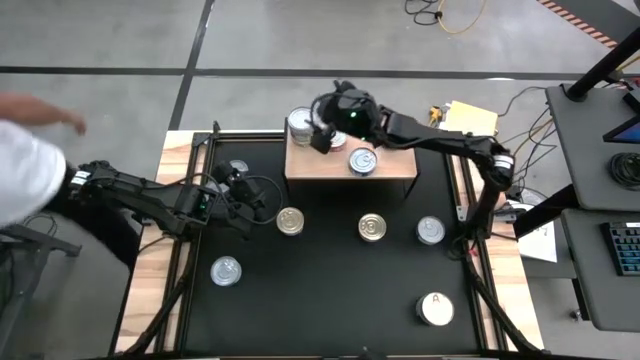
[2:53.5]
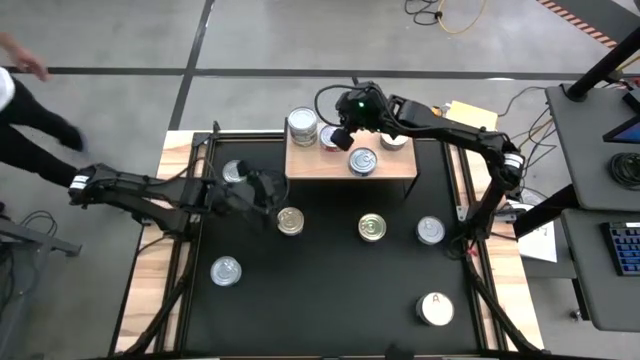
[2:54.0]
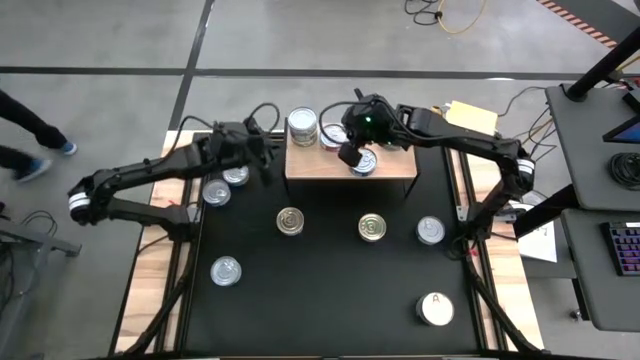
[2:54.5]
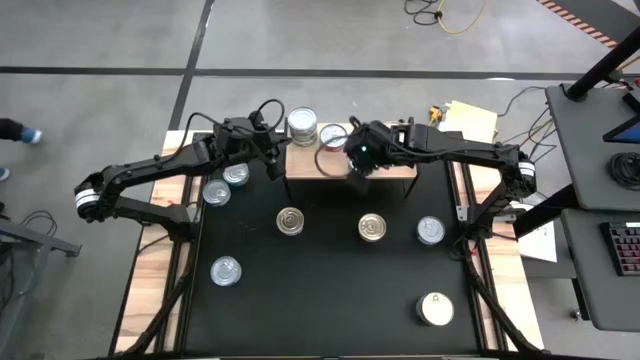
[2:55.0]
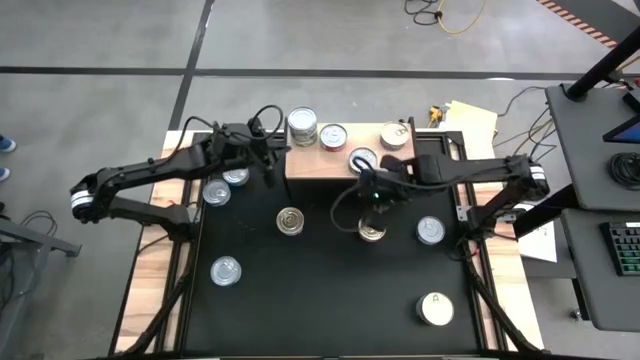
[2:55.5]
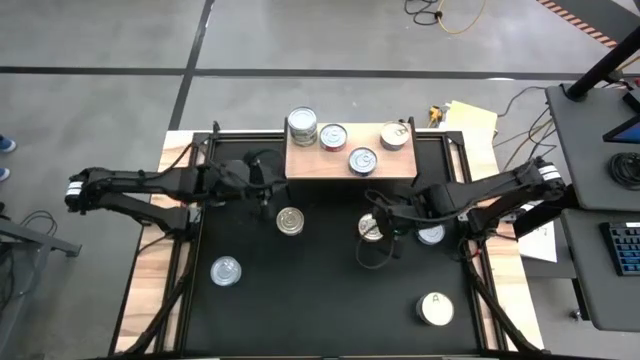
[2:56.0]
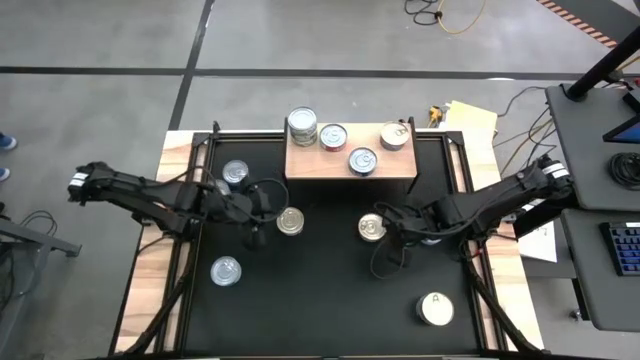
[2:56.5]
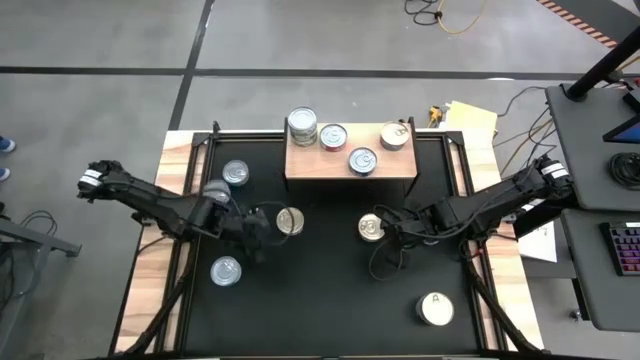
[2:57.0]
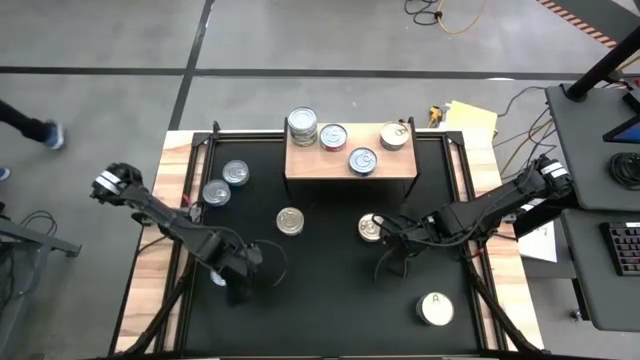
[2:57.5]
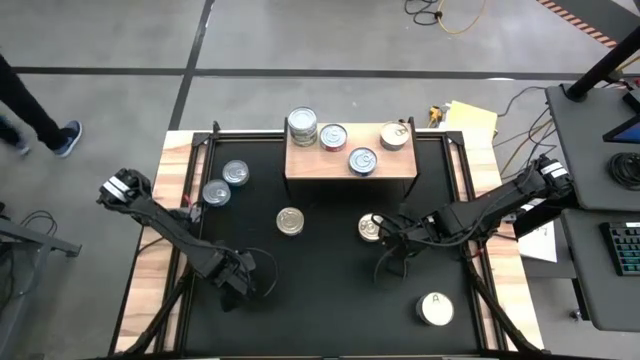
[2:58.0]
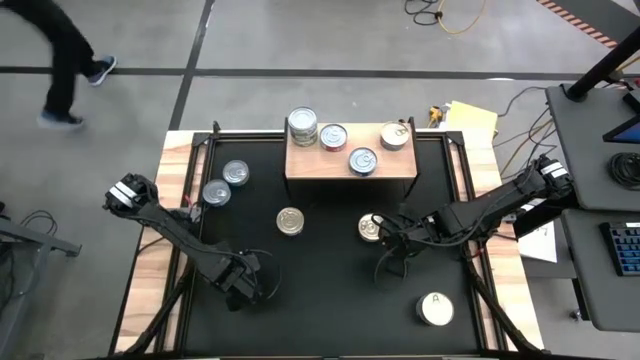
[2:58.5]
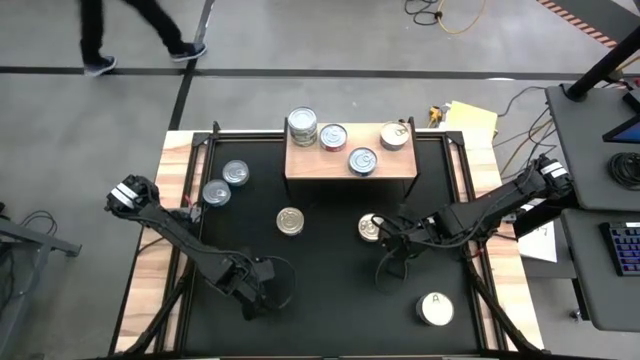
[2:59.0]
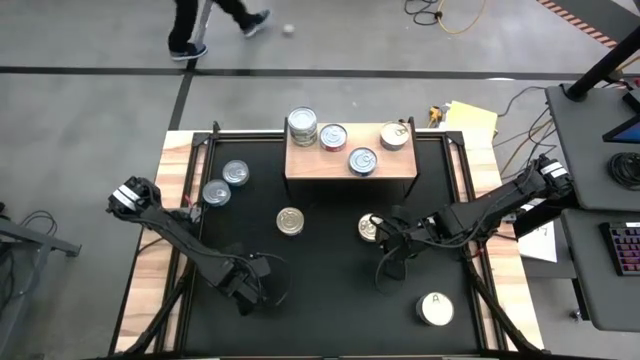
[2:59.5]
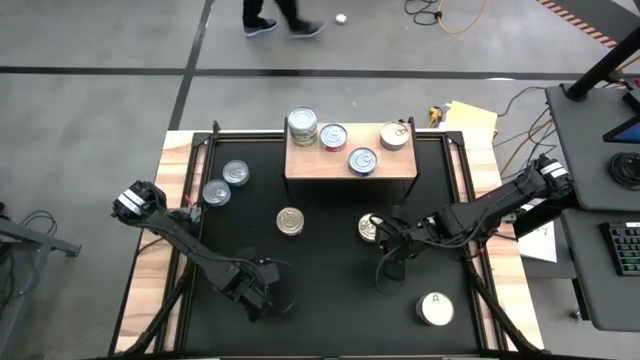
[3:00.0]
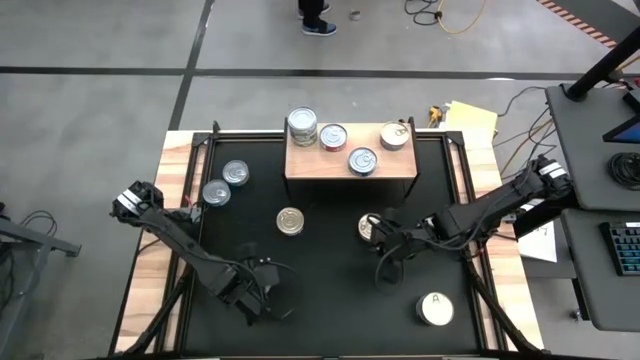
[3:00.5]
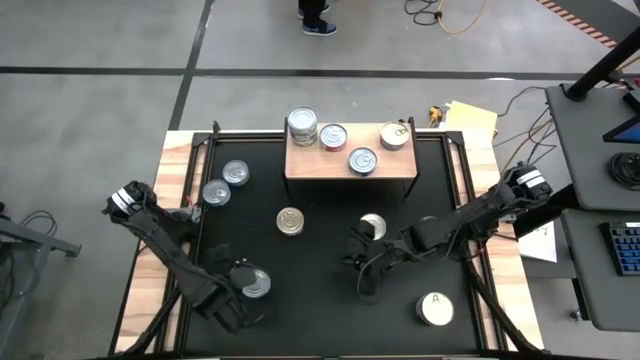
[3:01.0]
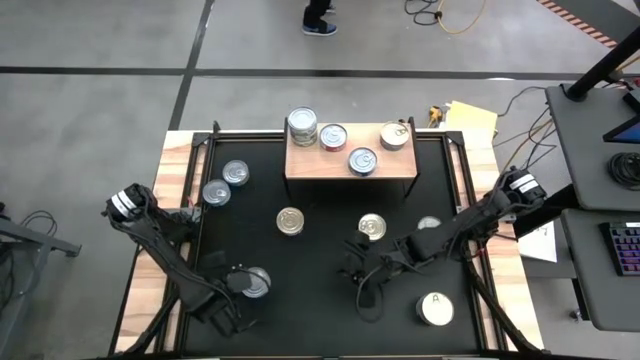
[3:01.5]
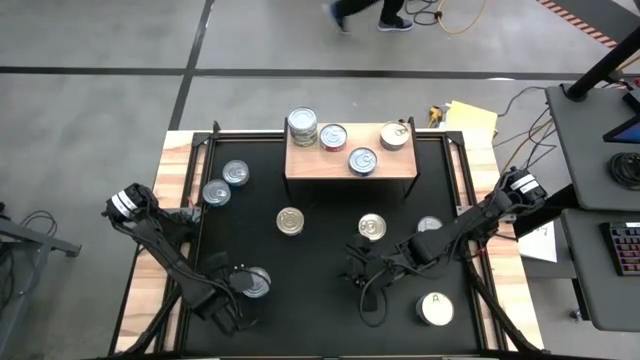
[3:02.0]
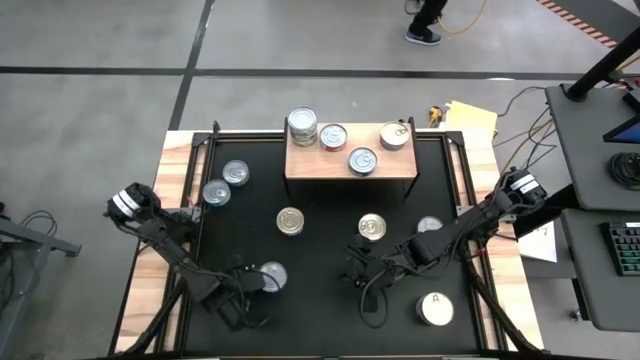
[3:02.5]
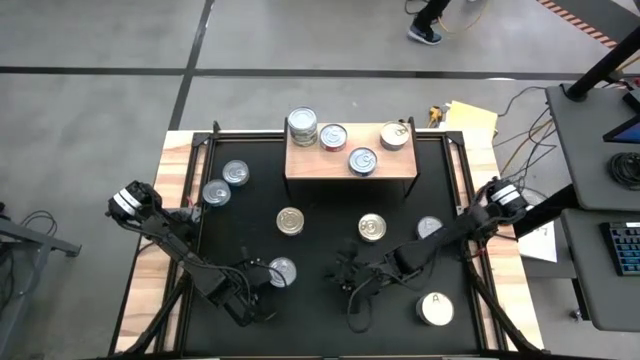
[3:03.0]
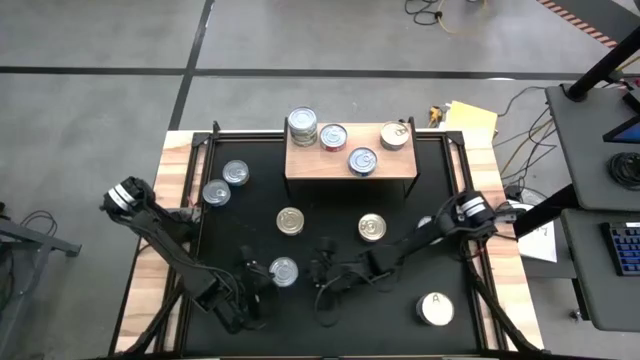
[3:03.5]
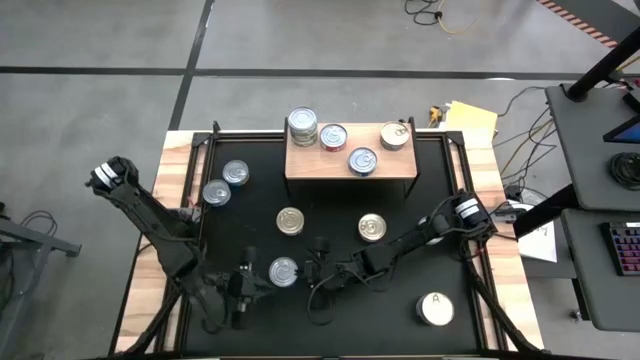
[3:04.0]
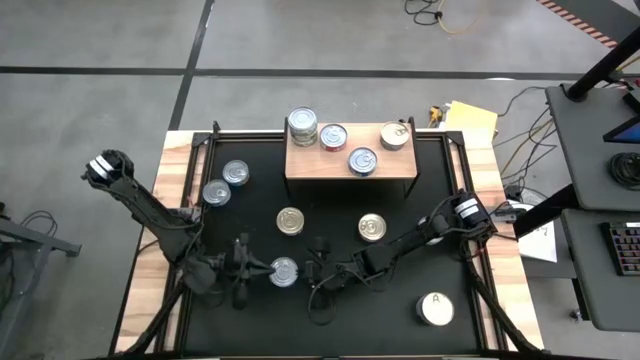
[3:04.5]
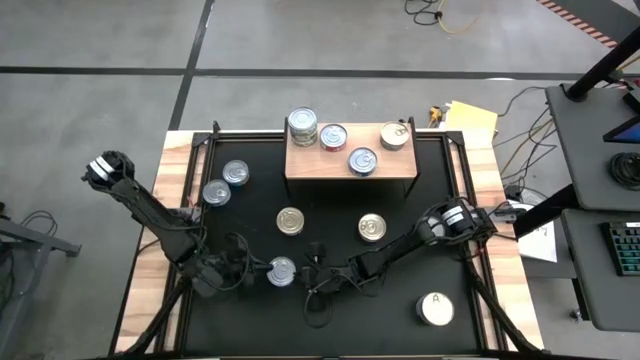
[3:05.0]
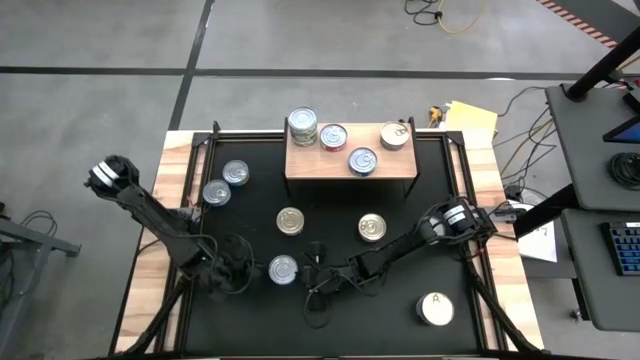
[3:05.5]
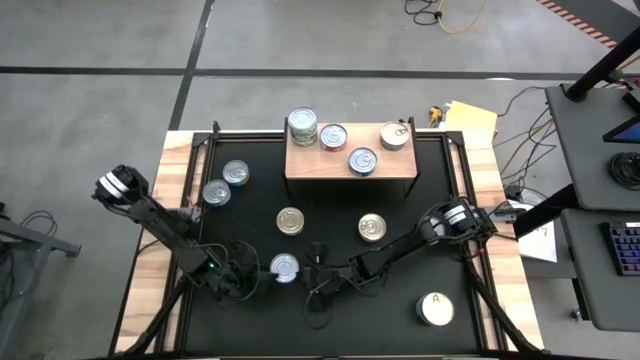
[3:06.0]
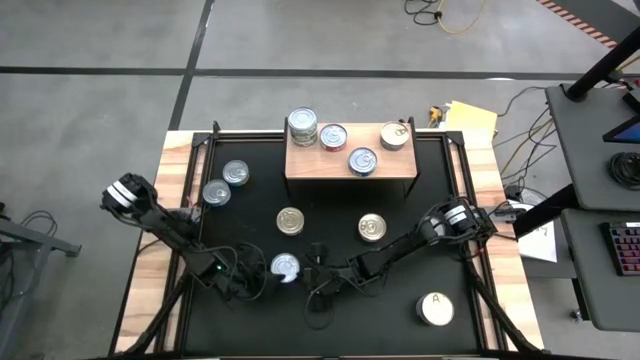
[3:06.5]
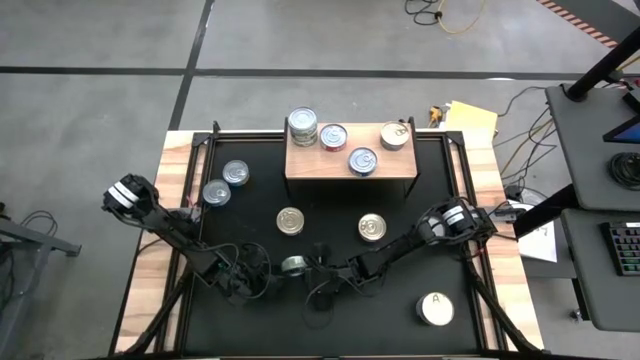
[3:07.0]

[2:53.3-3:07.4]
Task: Stack canned seafood by type on shelf
Put the green tuna can on the shelf

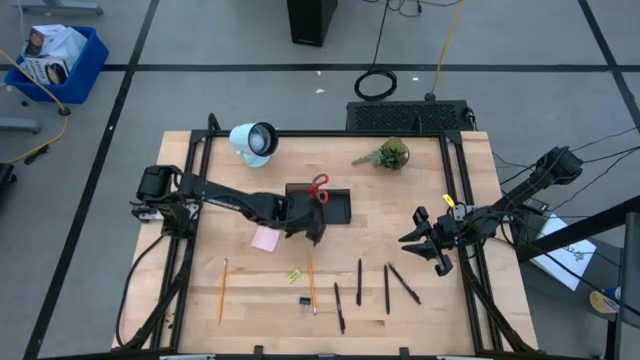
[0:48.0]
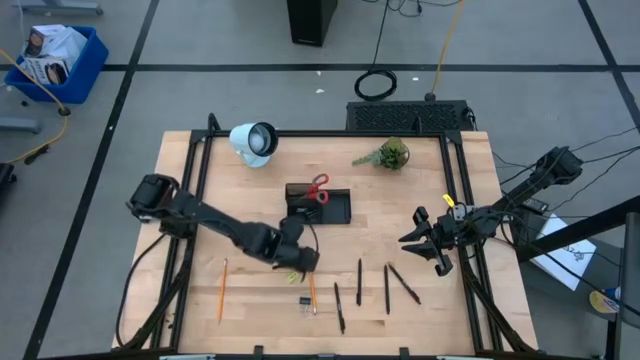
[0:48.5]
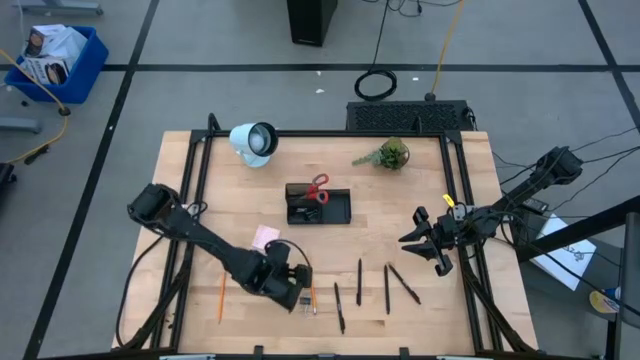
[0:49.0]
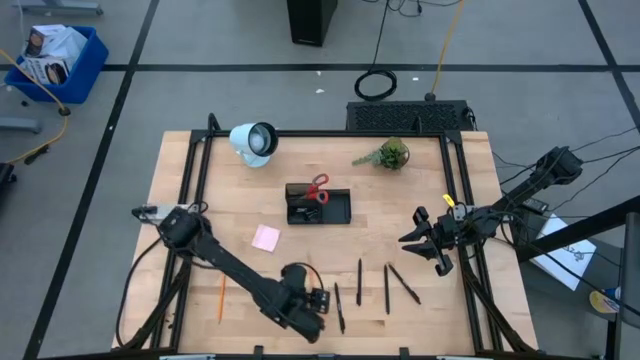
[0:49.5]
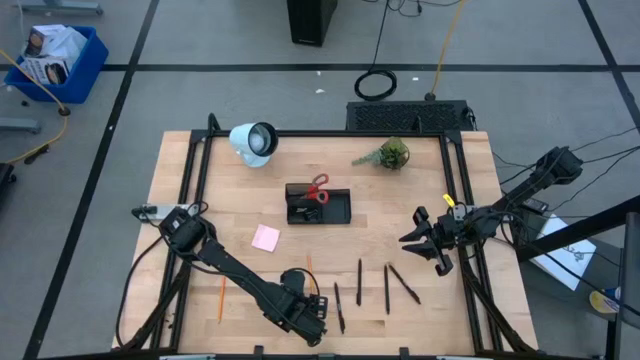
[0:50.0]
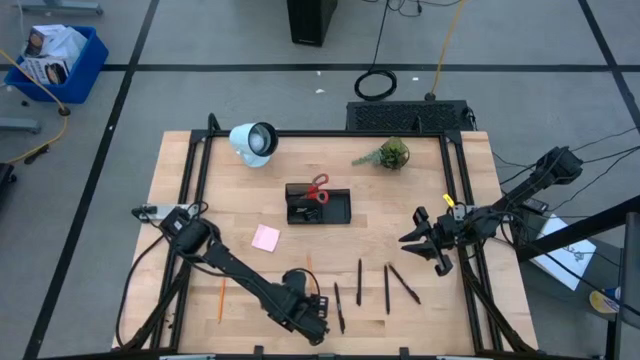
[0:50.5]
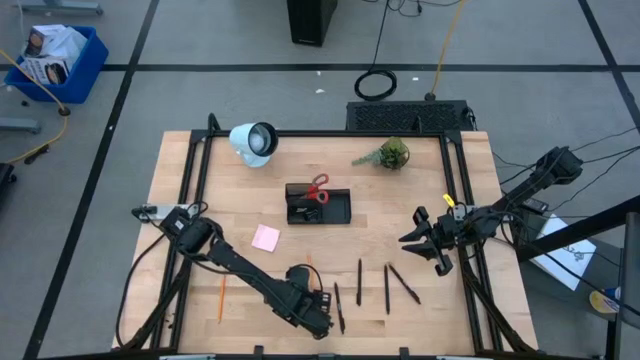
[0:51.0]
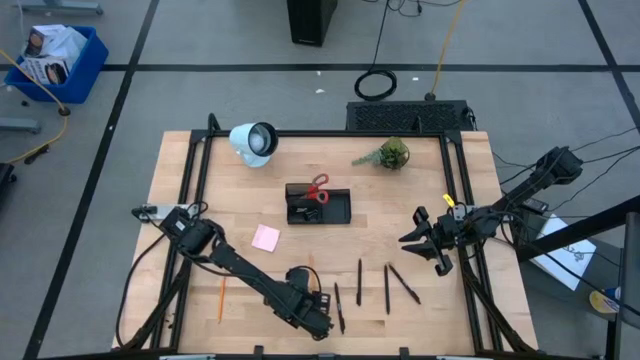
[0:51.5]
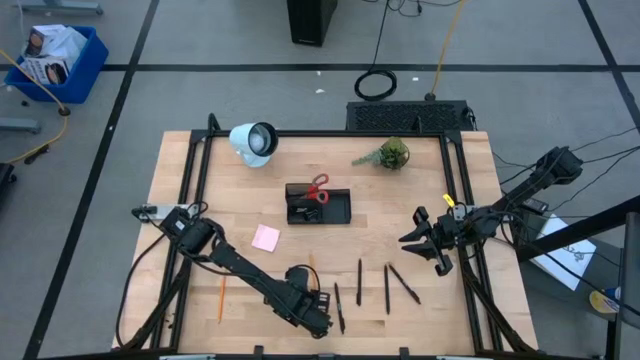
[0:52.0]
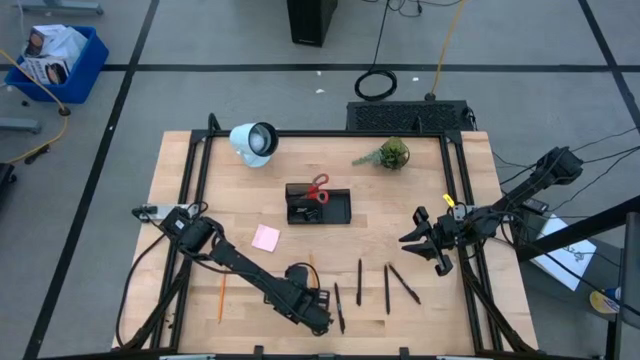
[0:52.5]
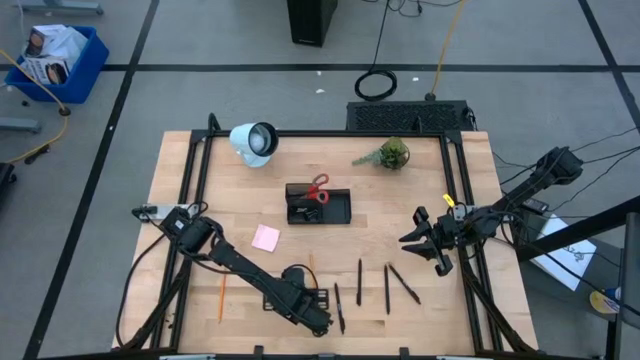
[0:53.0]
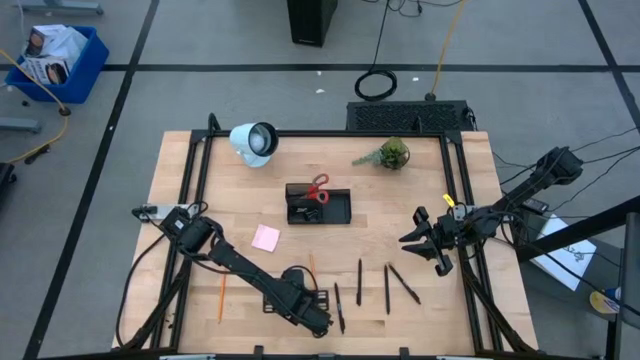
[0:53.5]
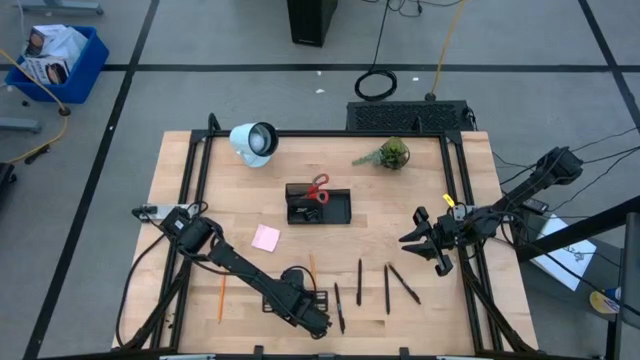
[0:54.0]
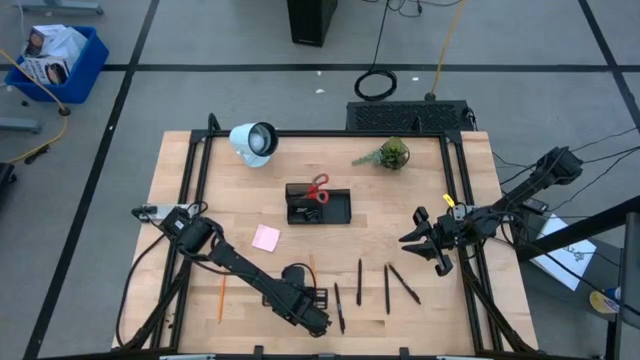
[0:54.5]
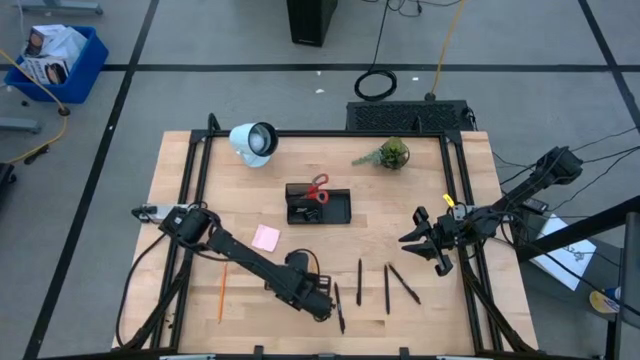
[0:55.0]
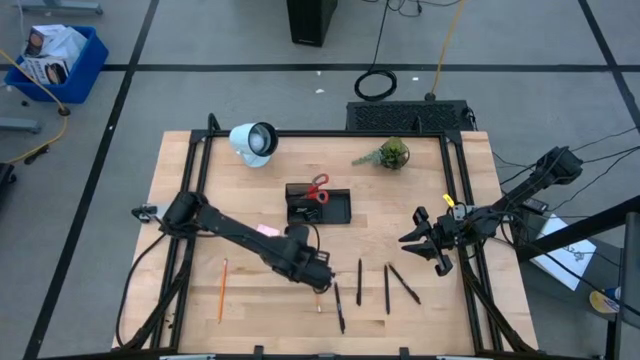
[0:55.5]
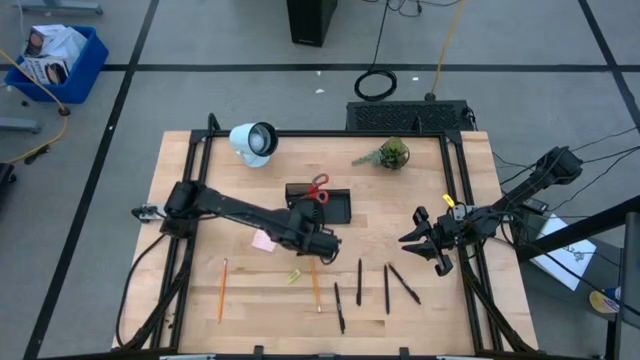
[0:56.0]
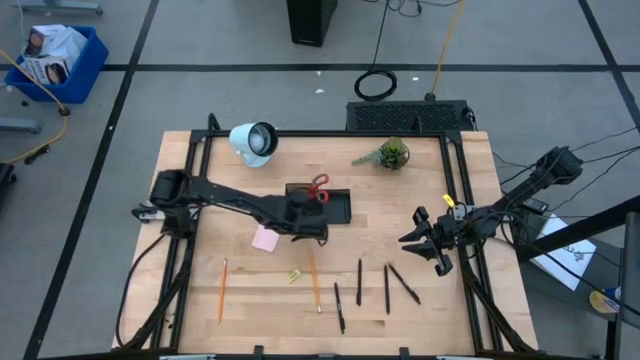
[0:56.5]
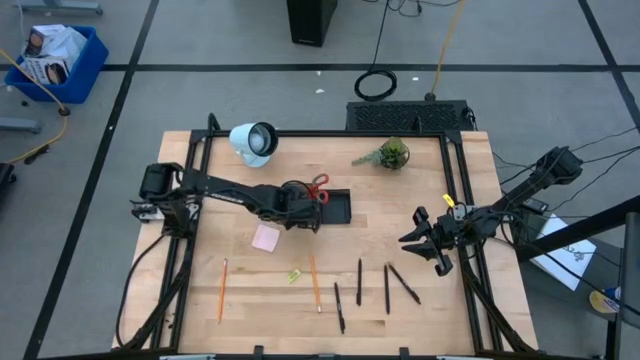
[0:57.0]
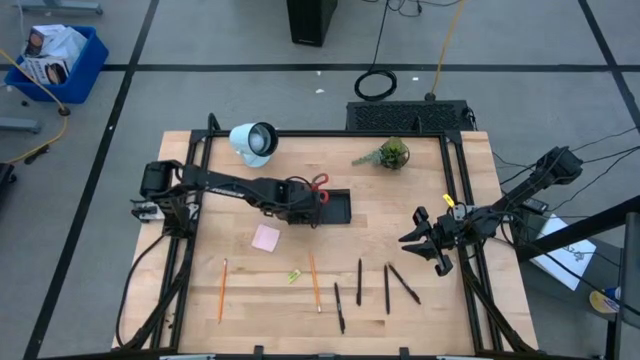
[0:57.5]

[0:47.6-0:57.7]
Task: Pick and place office supplies into organizer
Put the black binder clip into the black desk organizer
